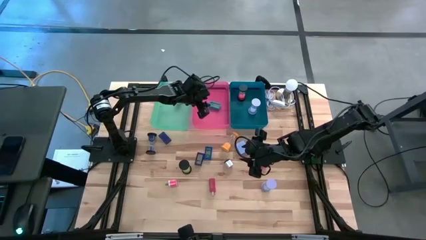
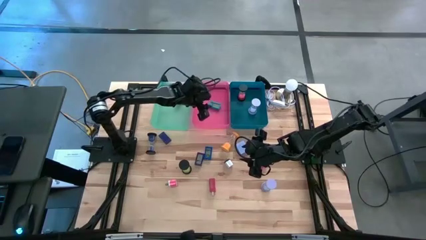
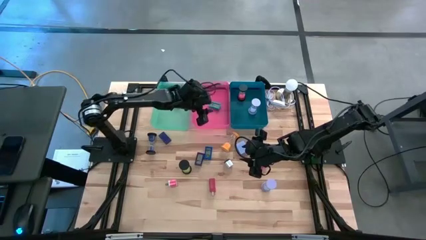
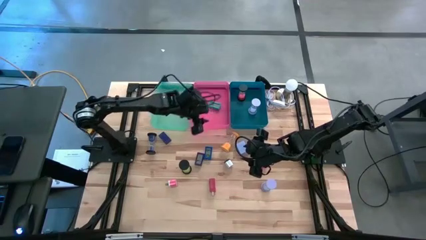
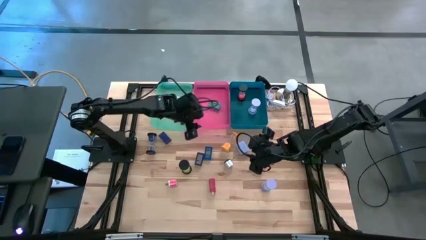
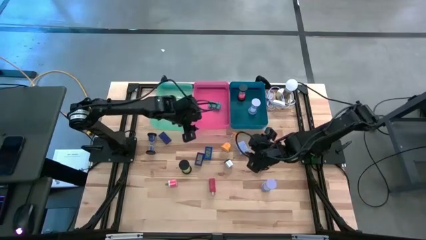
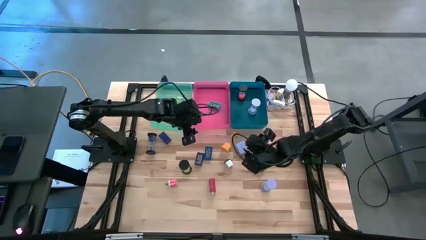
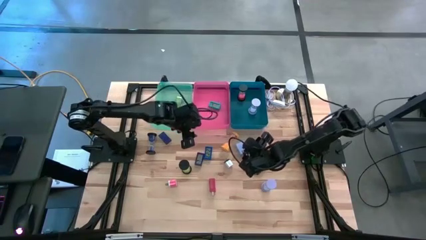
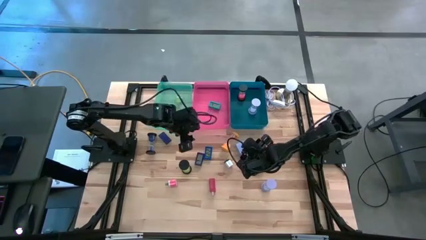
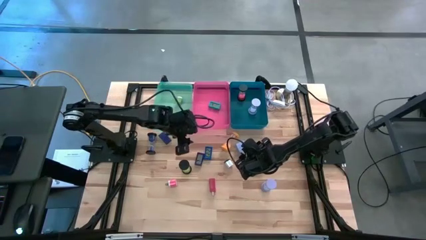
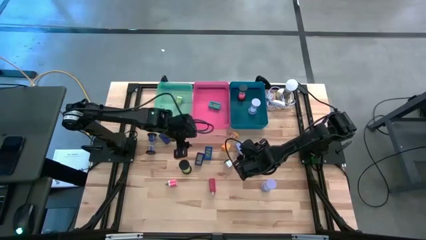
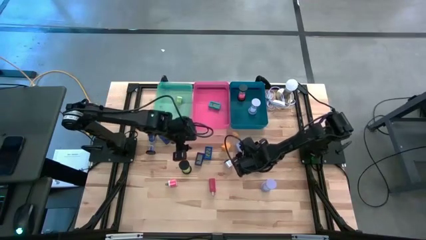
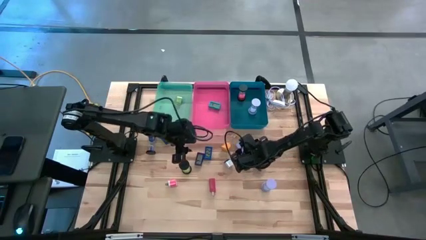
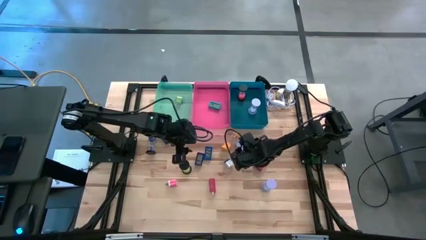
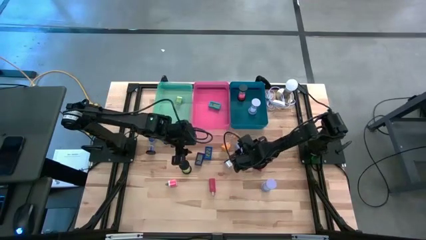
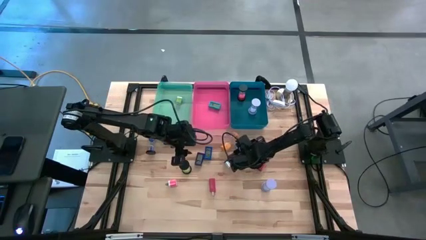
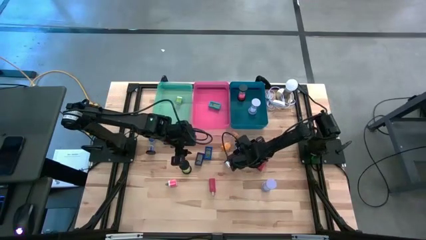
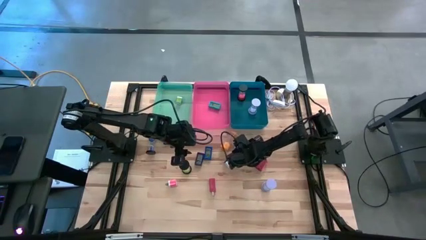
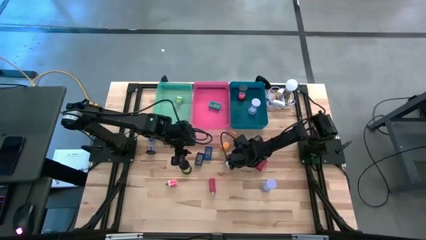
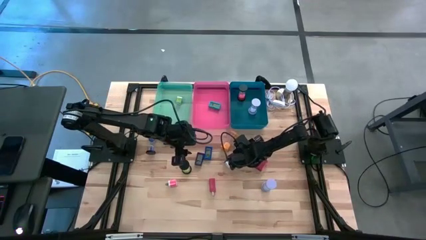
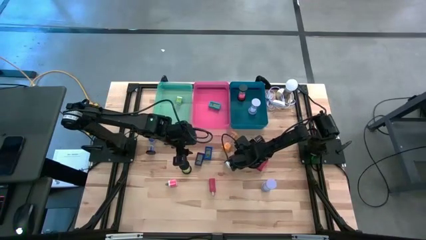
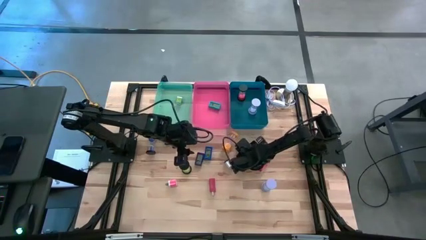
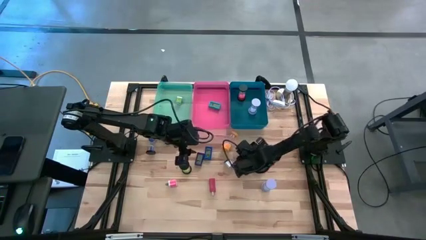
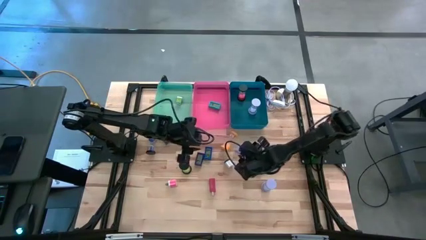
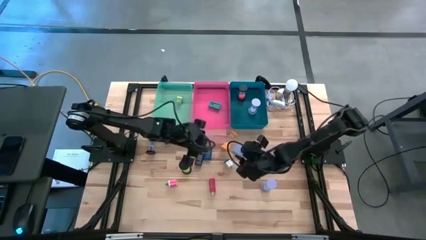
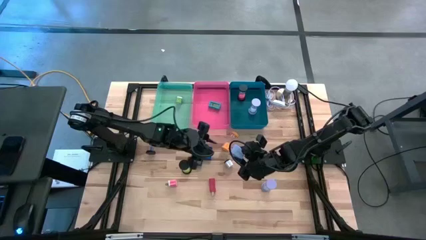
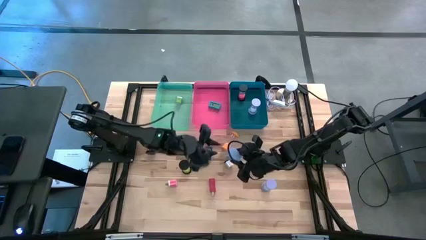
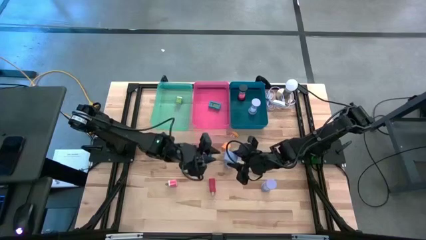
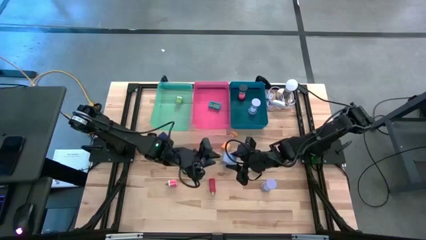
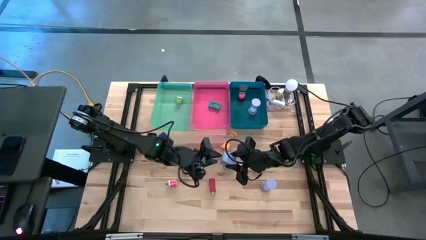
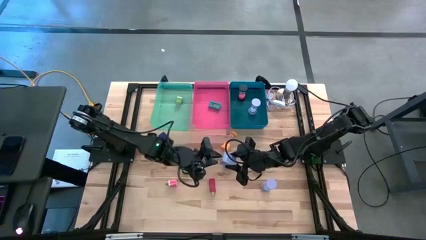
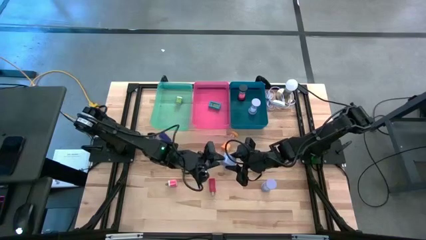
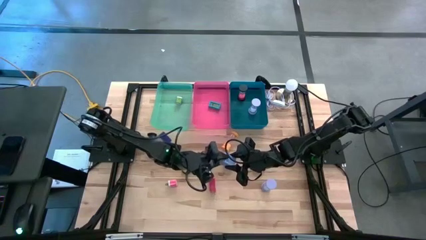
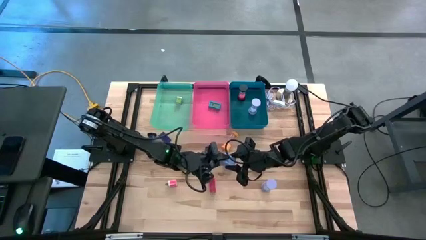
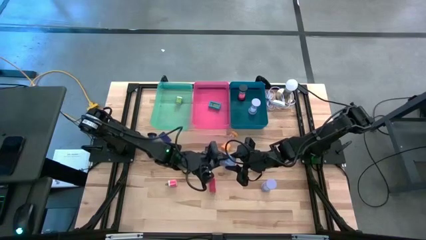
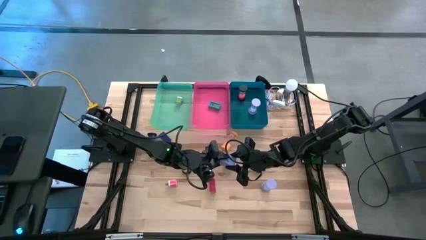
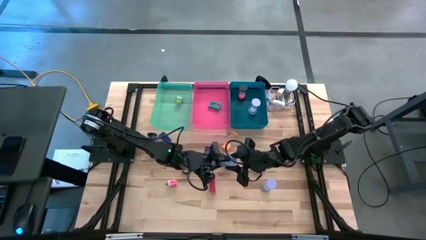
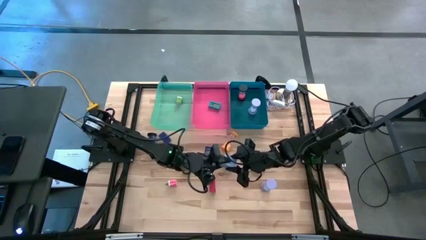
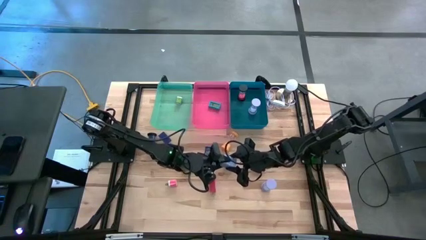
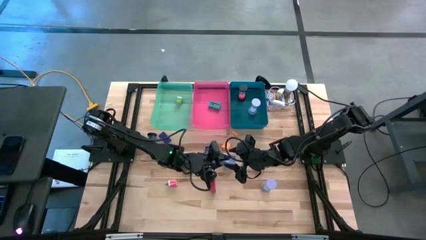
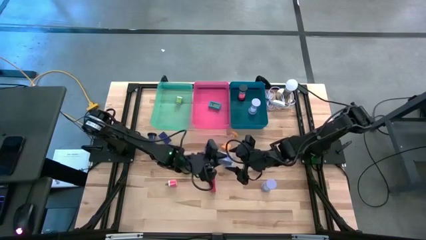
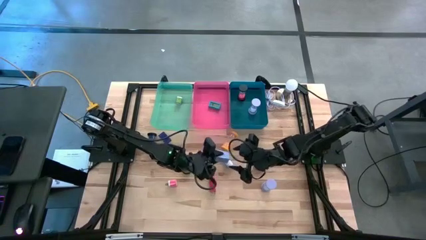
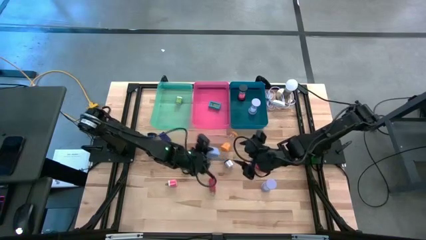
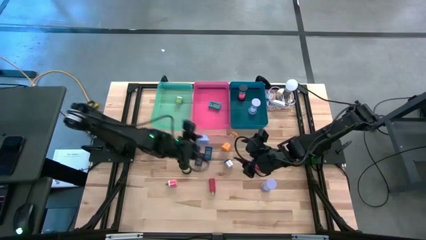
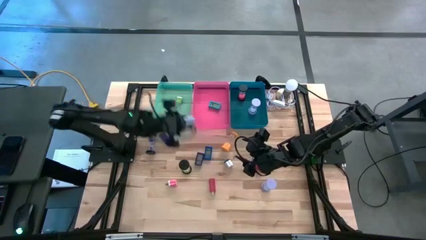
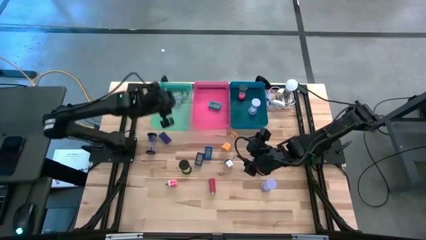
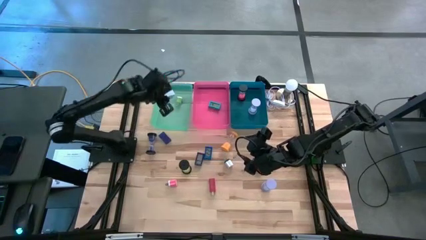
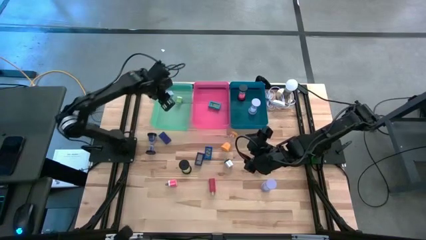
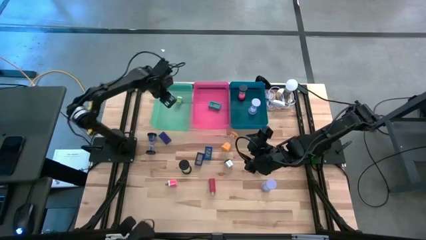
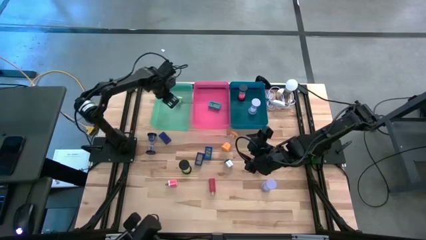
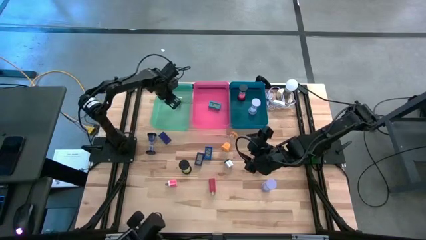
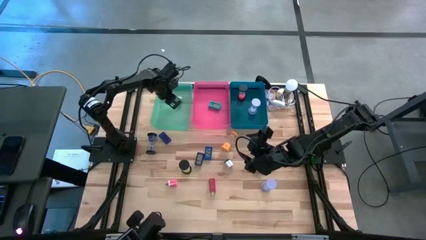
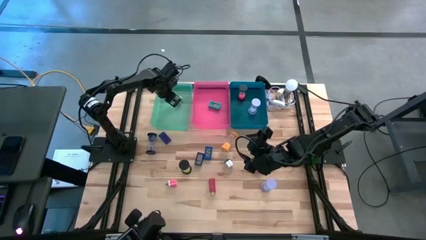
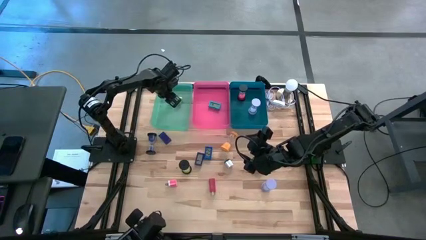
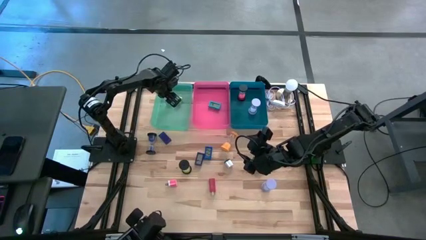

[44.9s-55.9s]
Task: Pick & Place Office items
Put the purple adapter into the green bin

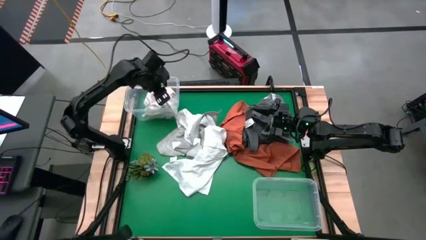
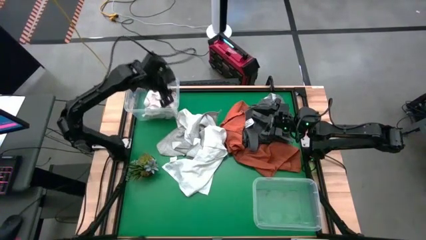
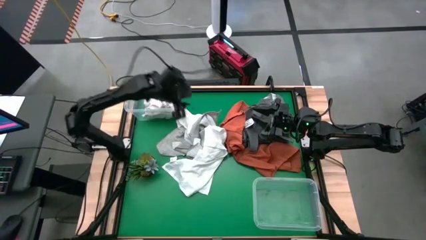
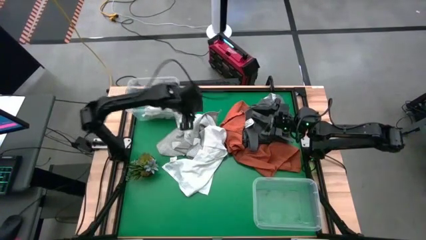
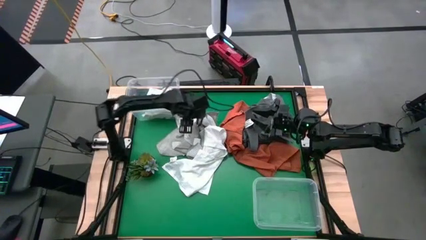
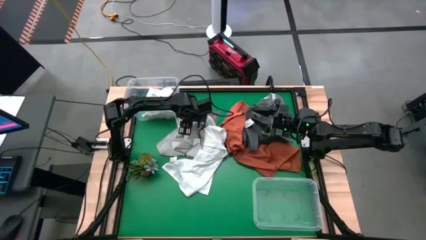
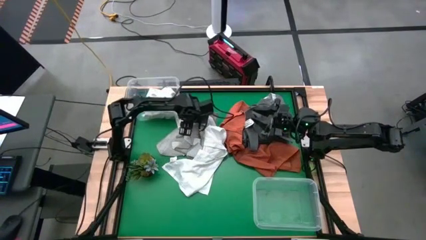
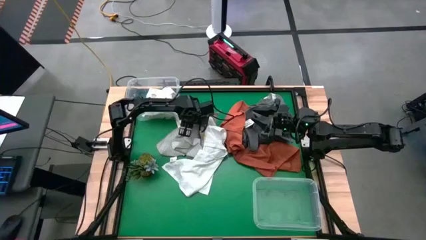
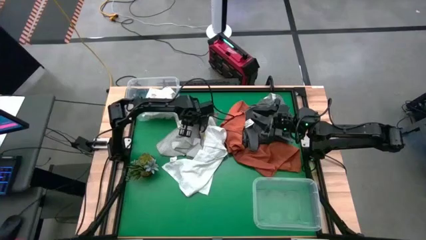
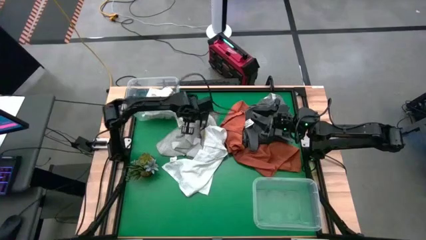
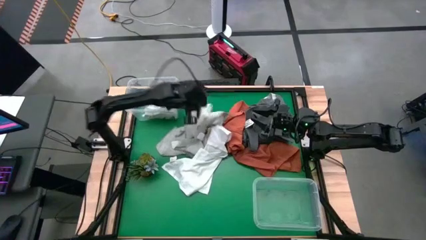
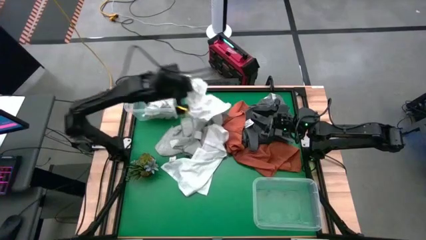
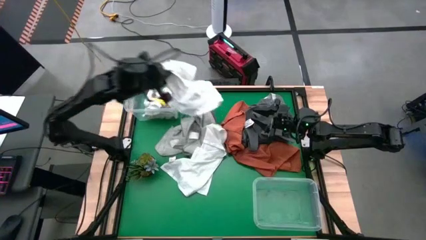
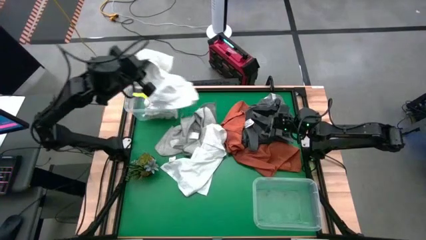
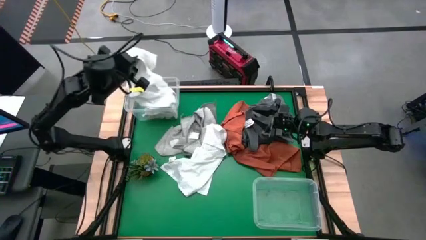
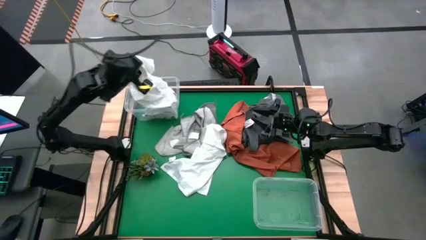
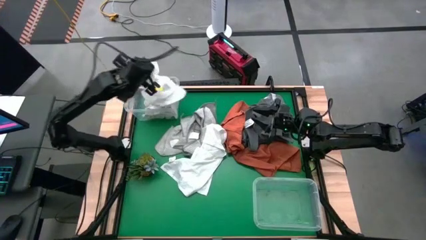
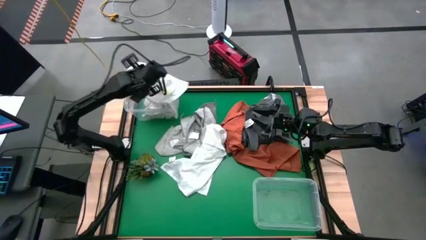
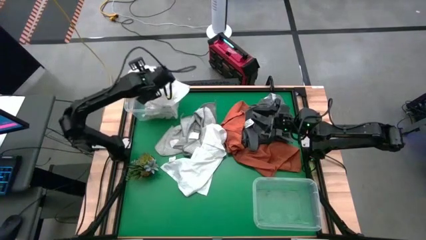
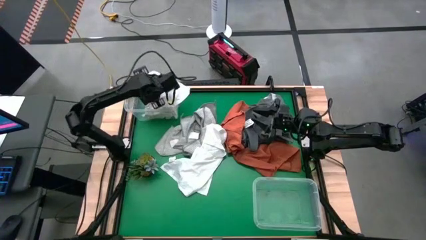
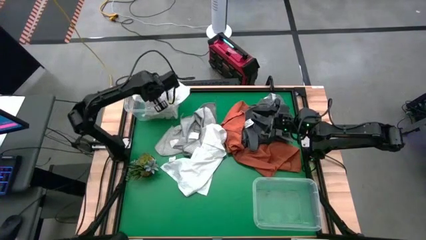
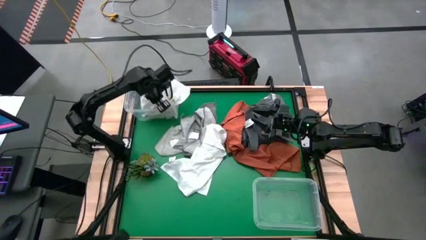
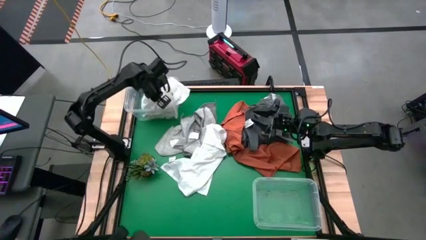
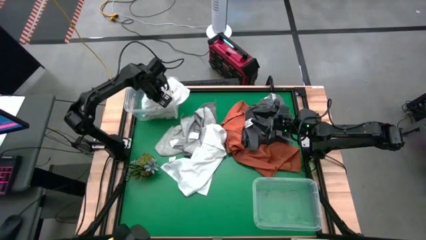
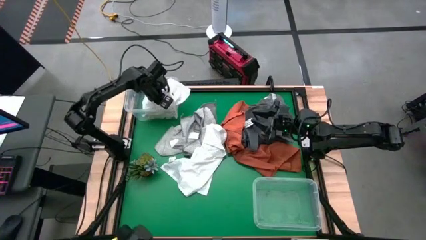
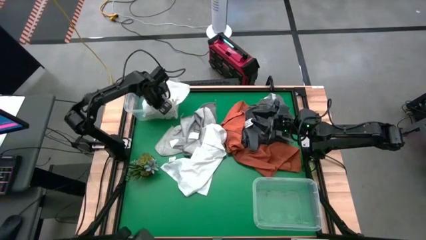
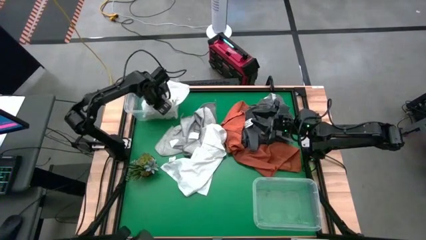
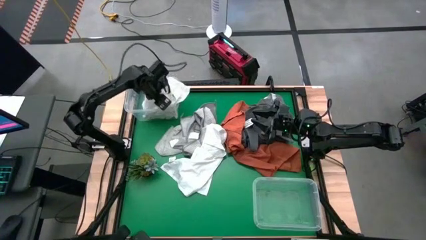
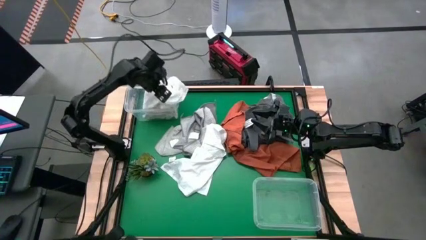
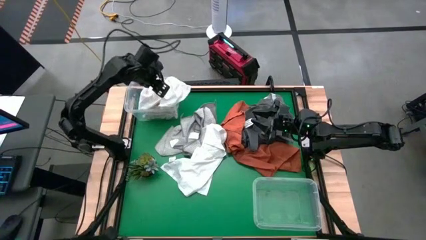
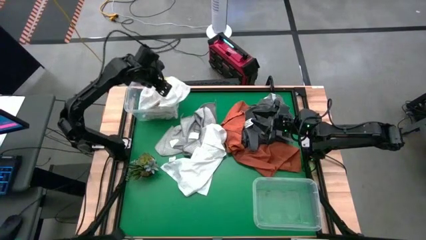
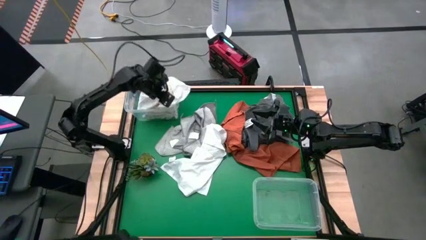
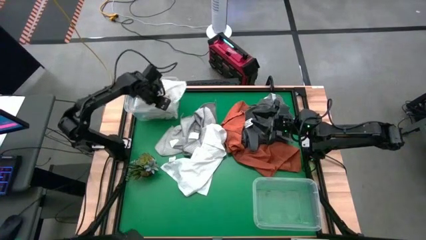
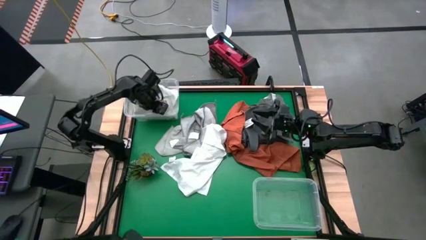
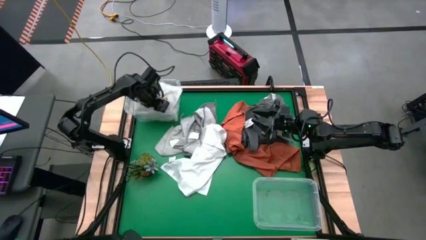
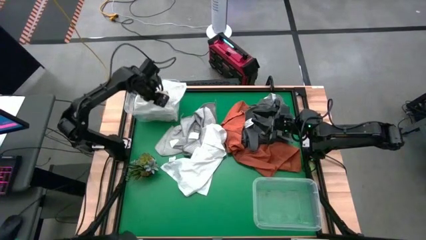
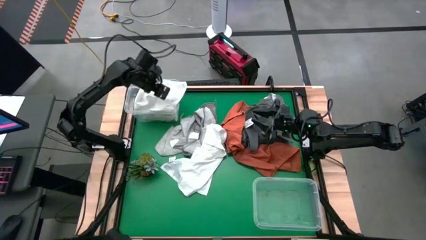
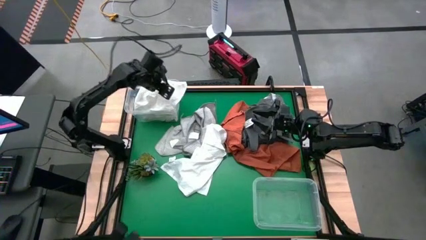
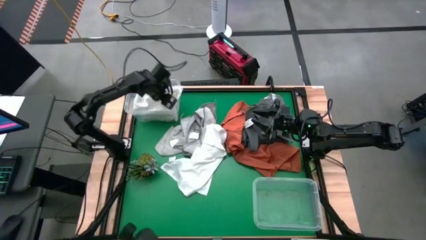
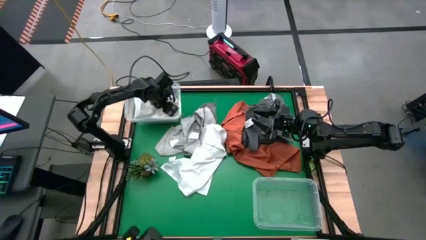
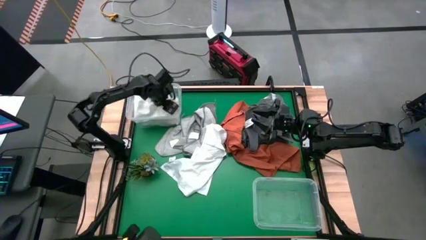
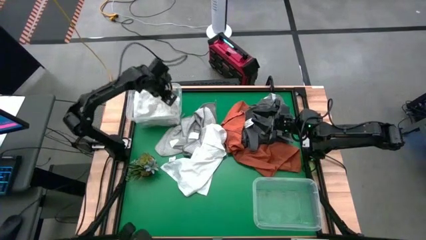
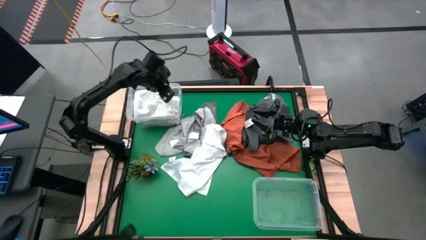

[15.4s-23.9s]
Task: Sort towels by color in basket
Put the white towel into the top transparent bin
